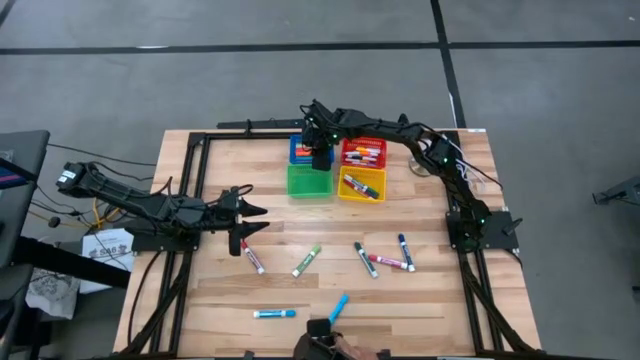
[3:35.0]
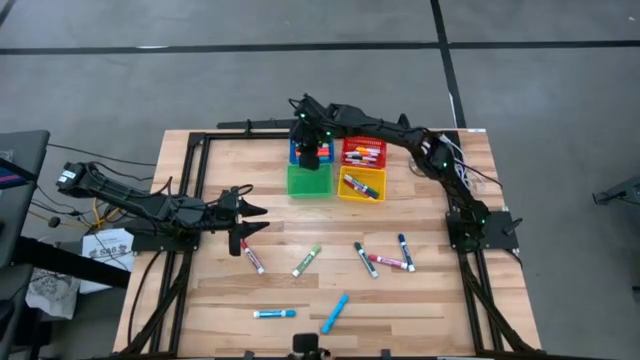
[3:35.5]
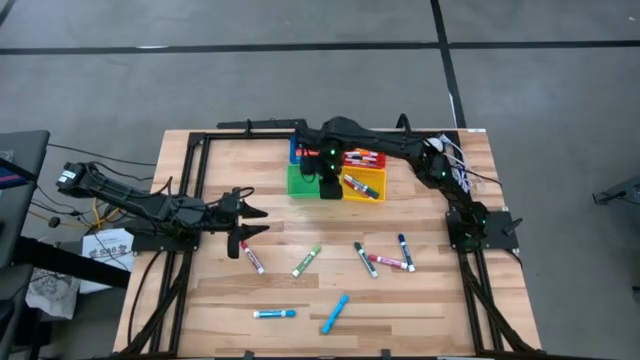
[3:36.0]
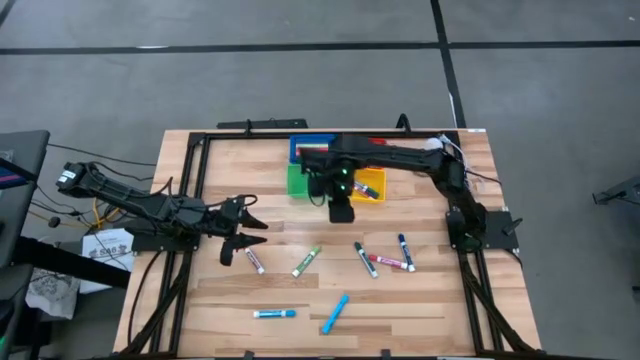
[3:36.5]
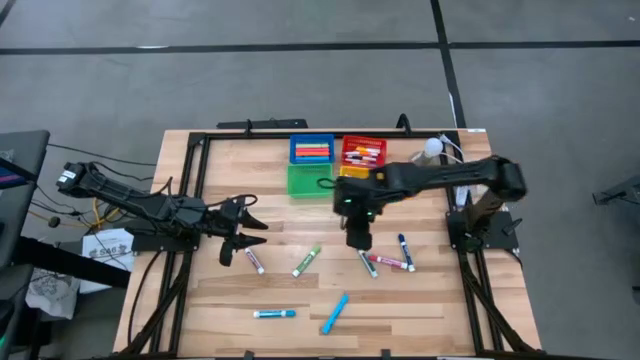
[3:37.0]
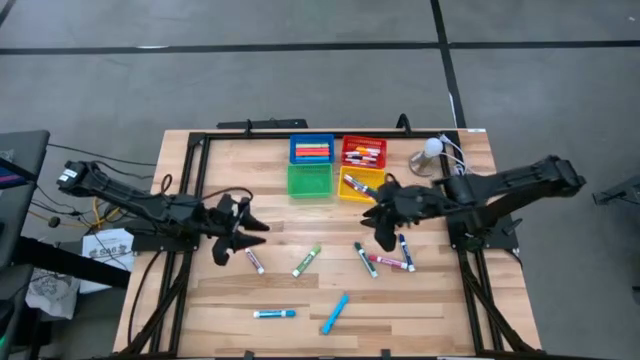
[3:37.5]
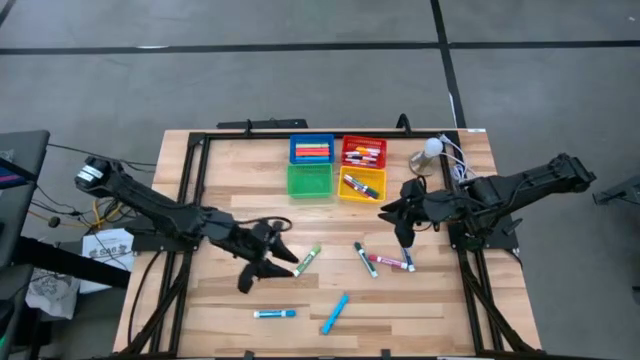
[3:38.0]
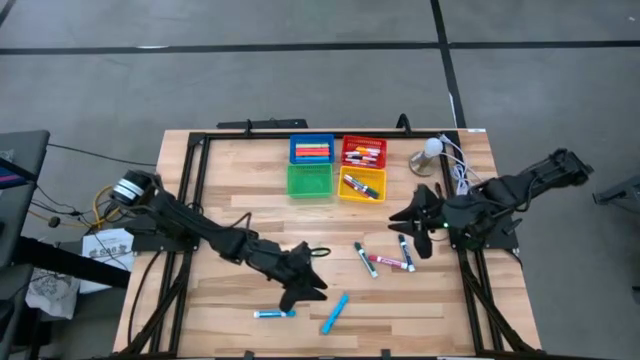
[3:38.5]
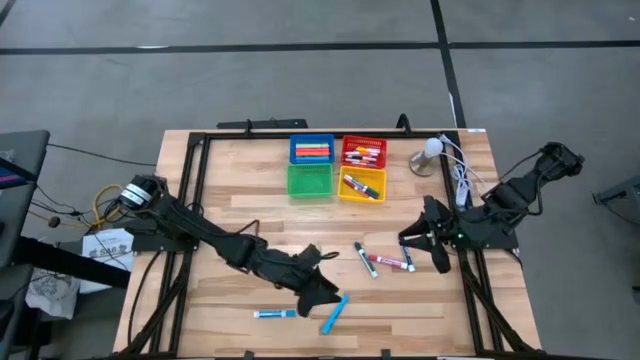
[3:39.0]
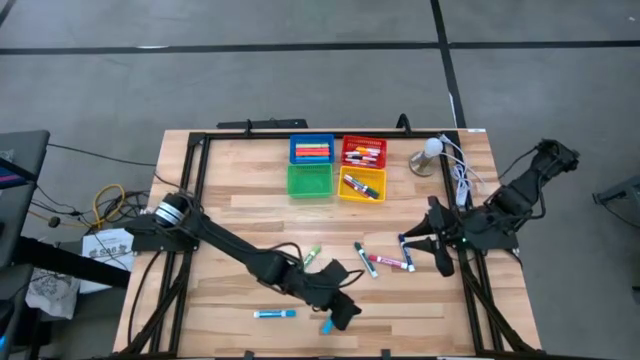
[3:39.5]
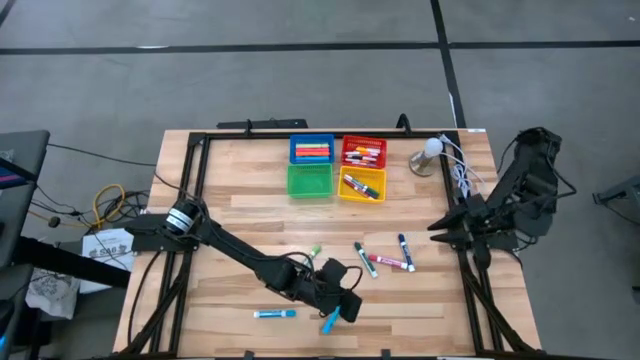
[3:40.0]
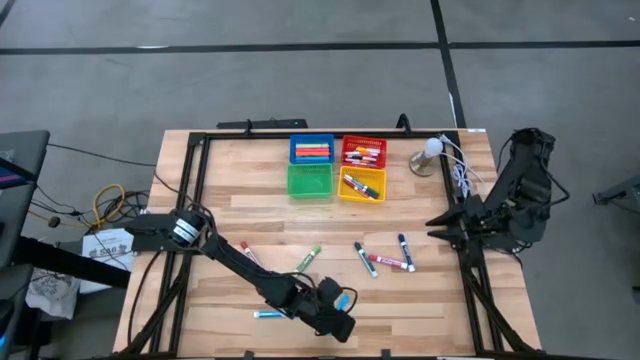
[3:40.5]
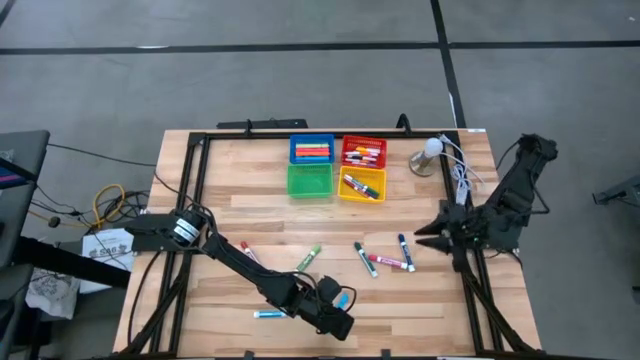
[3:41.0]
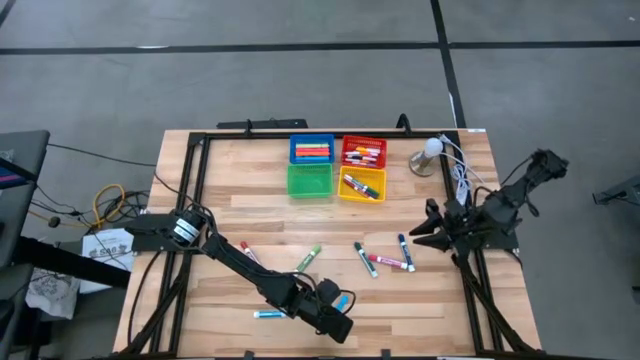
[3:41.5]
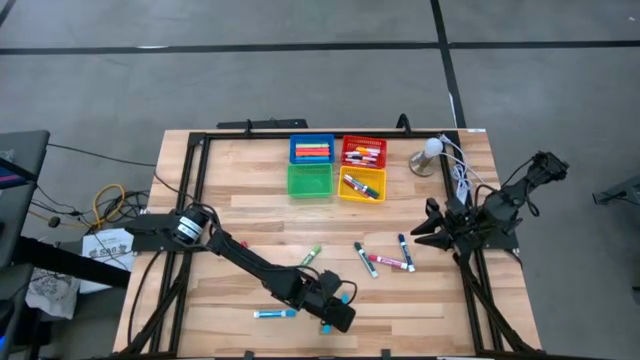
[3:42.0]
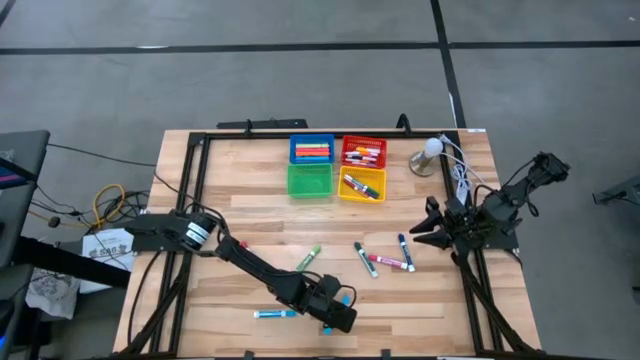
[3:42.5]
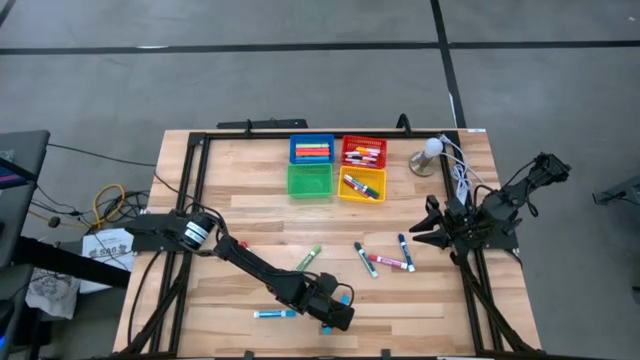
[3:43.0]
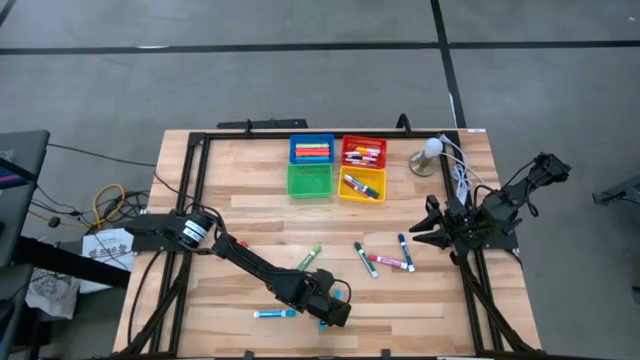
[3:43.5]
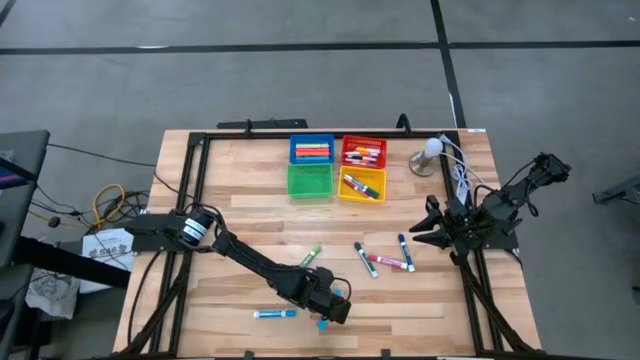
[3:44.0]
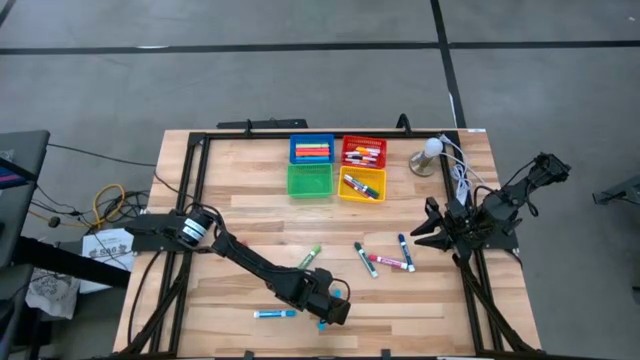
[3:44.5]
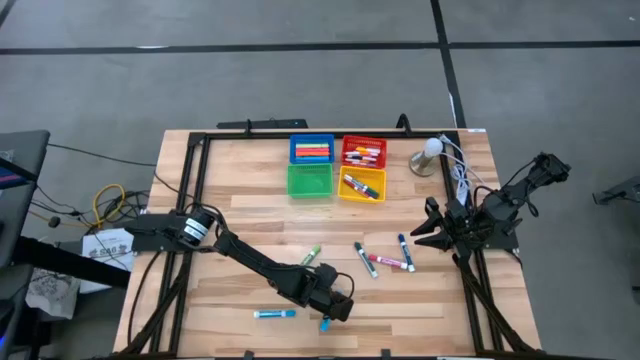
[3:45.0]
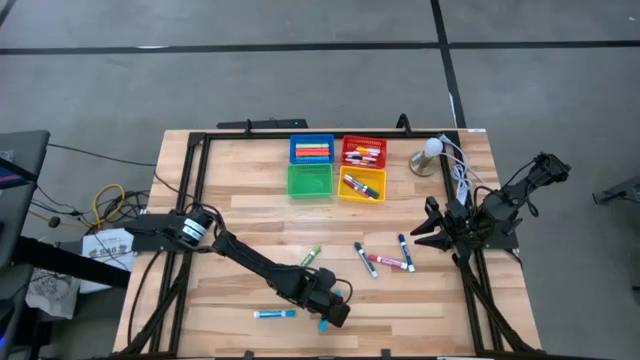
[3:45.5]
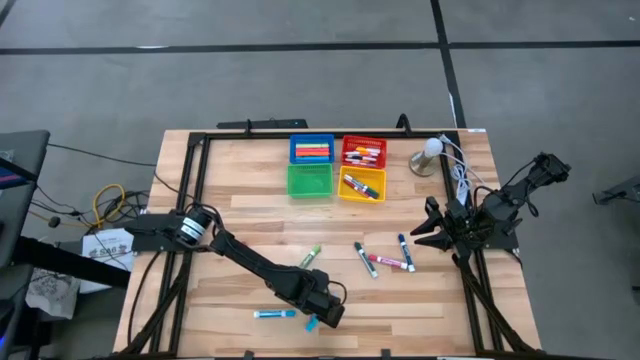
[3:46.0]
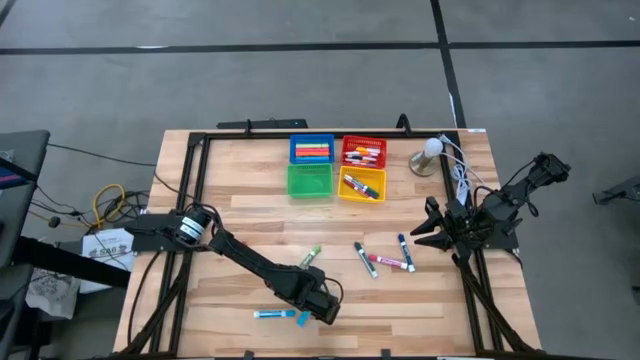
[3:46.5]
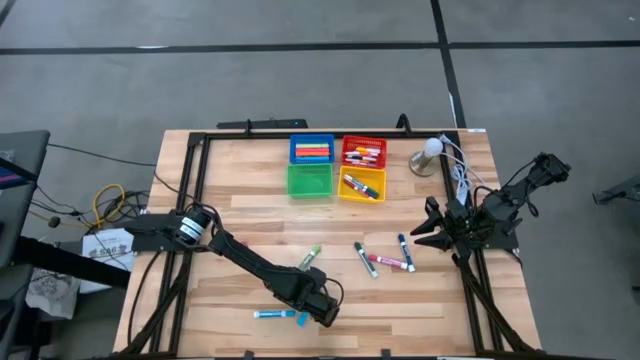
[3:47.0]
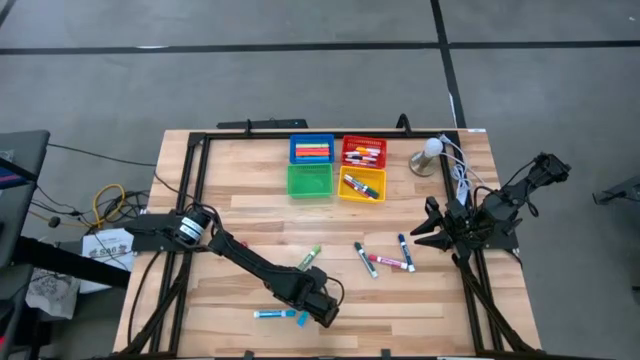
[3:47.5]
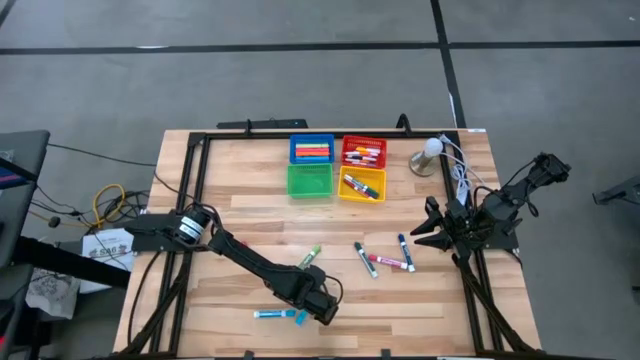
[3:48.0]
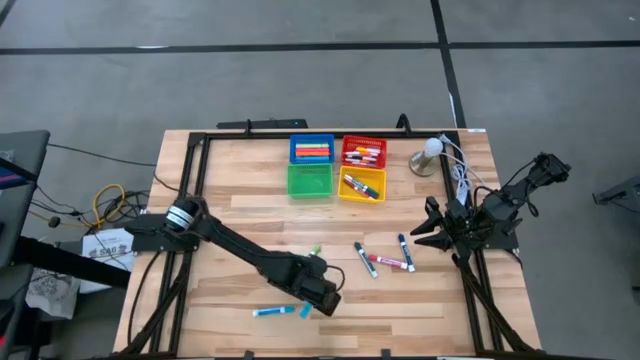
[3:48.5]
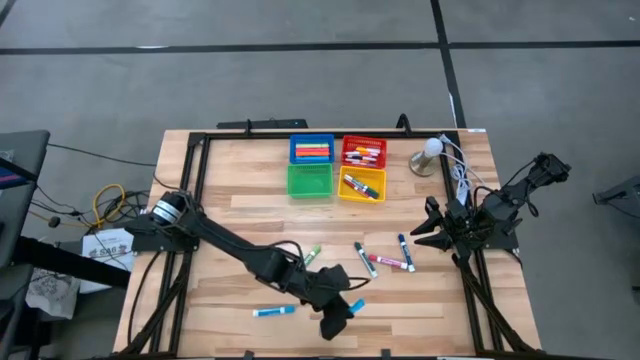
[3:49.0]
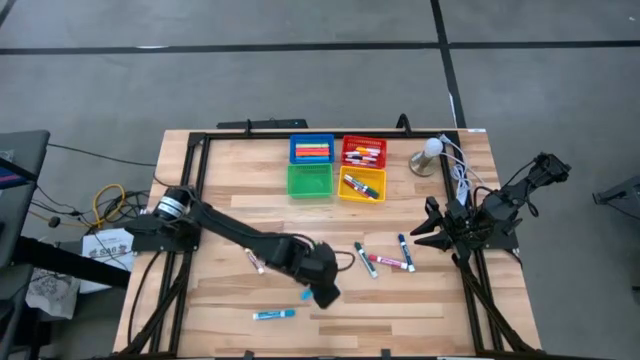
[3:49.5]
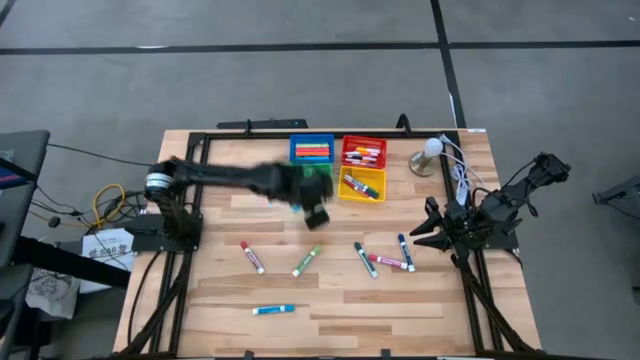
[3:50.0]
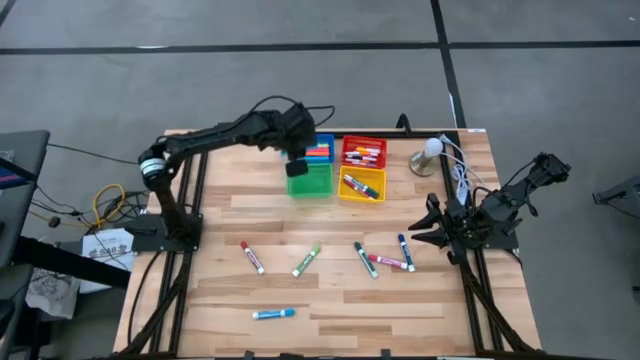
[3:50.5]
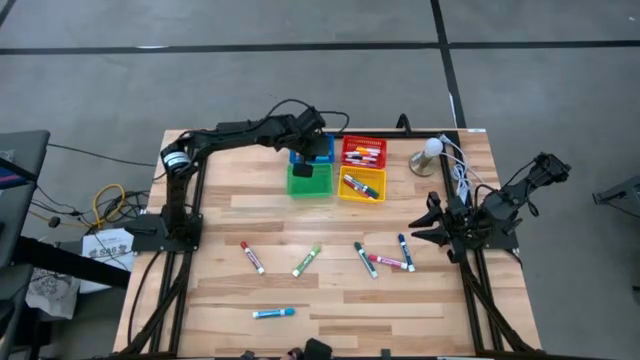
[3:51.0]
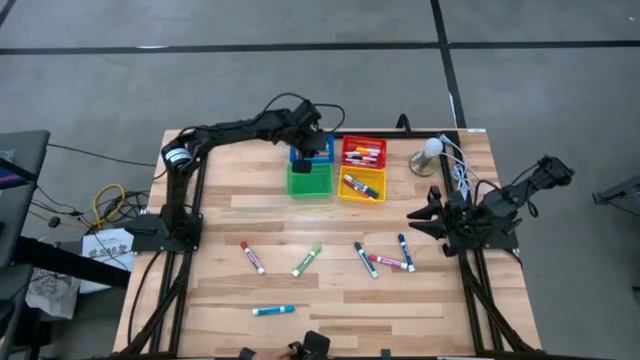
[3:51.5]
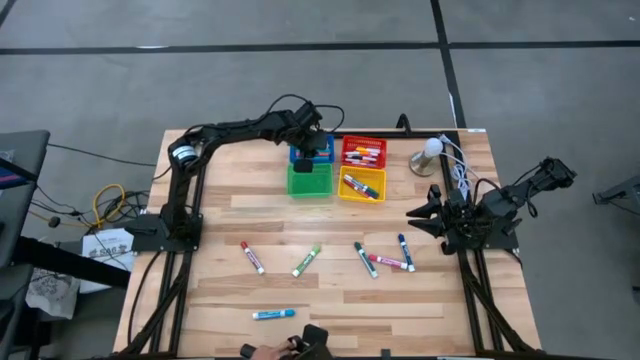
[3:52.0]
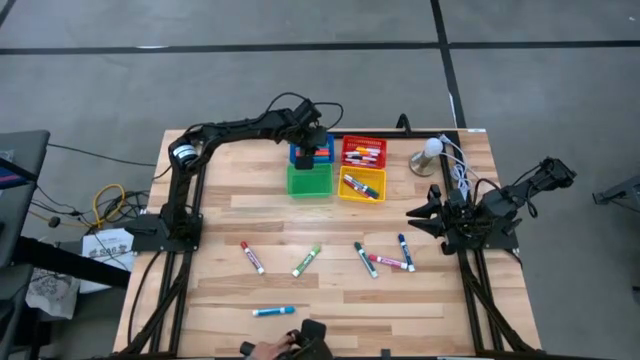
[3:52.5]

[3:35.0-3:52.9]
Task: Pick & Place Markers
Put the blue highlighter into the blue bin

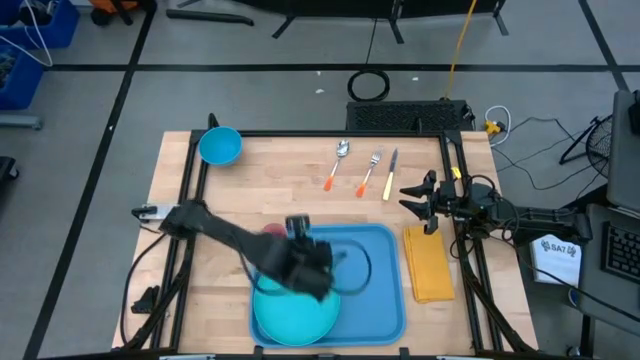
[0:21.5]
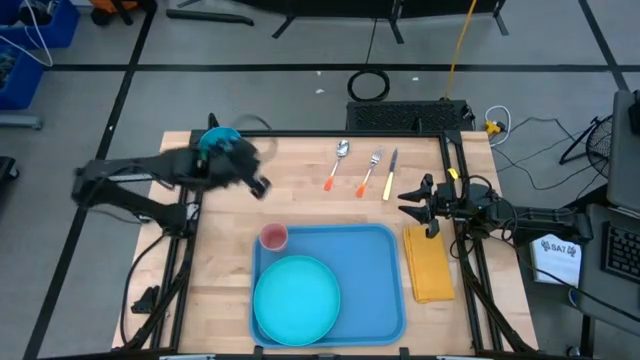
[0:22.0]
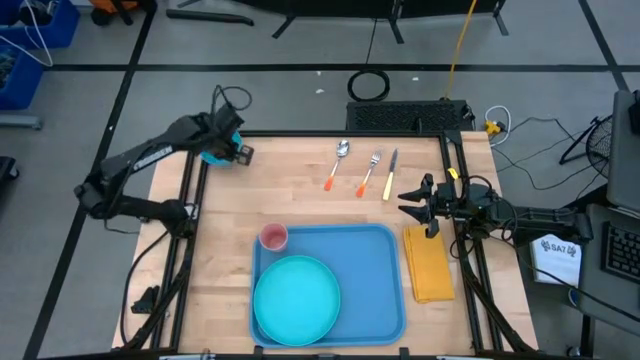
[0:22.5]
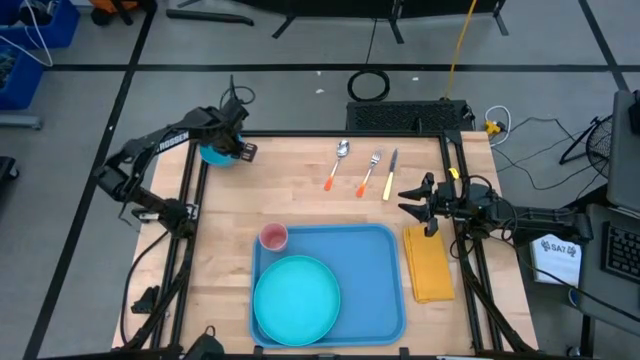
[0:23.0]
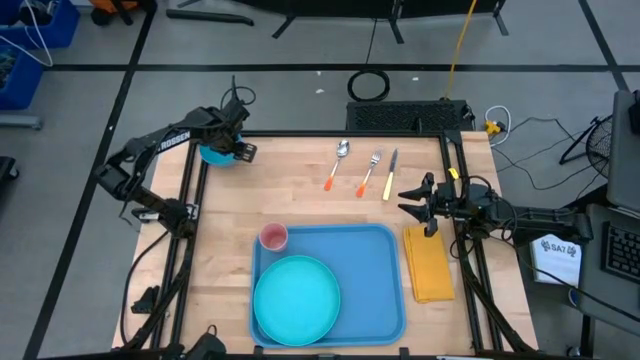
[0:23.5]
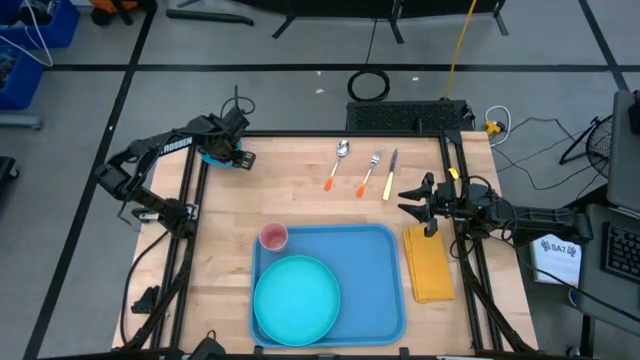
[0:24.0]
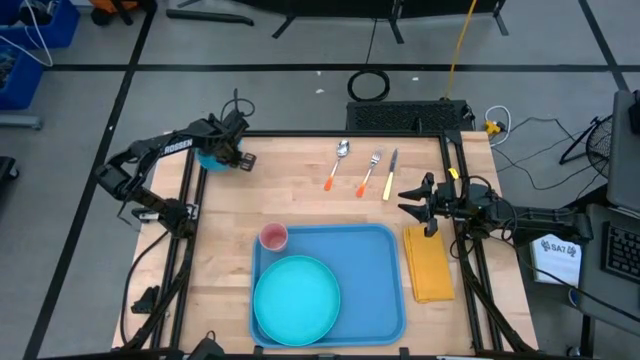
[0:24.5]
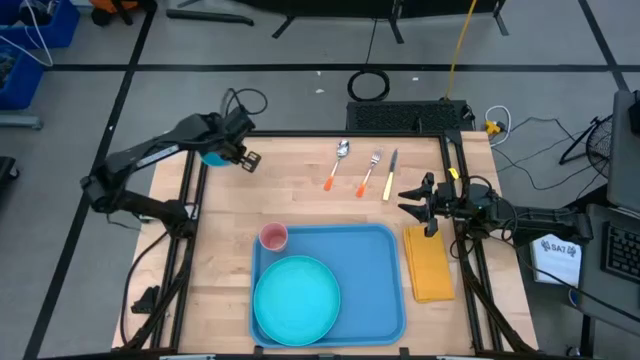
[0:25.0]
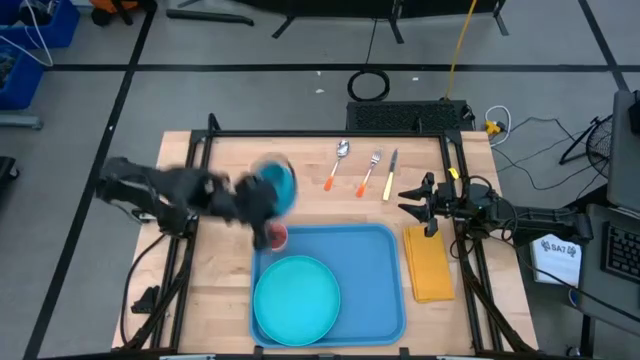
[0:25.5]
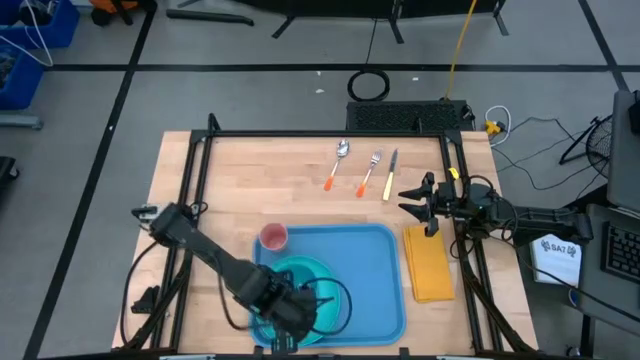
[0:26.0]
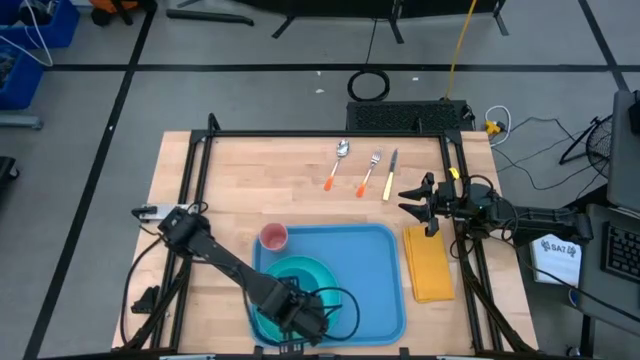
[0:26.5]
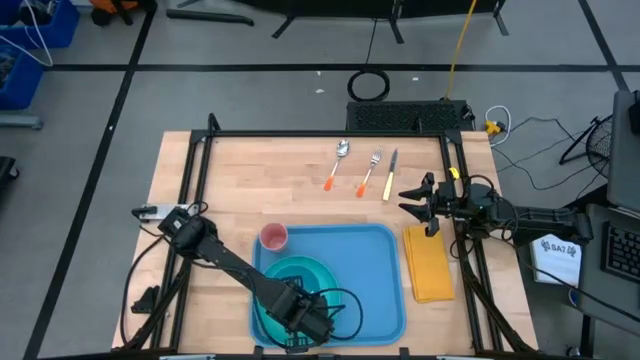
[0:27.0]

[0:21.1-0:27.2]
Task: Set up tray
Put the blue bowl on top of the blue plate on the blue tray
